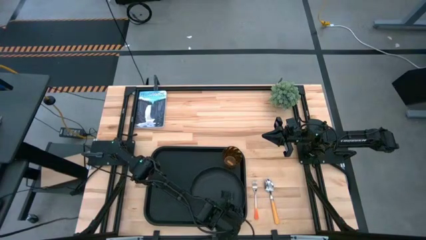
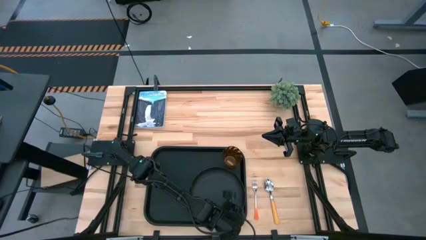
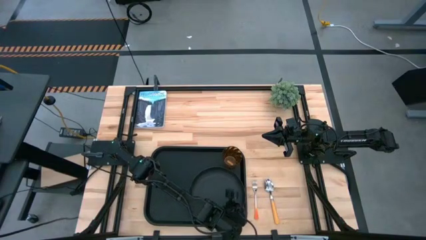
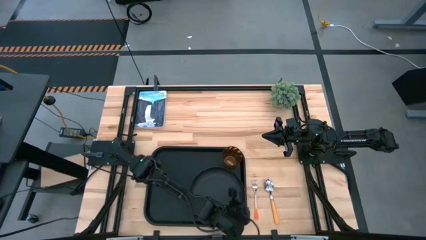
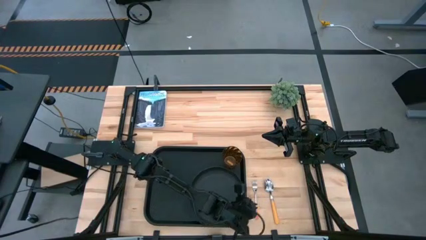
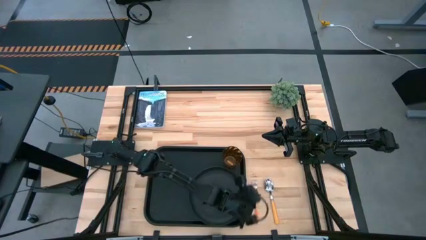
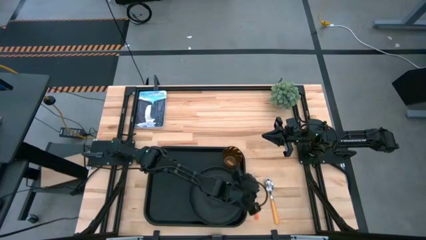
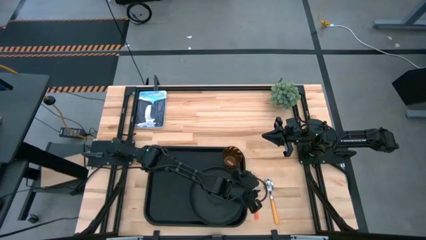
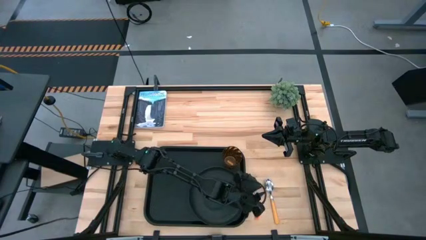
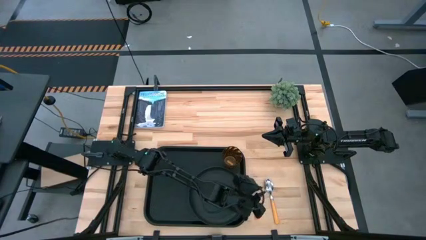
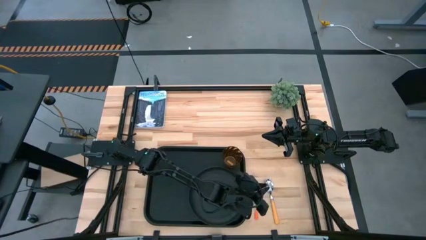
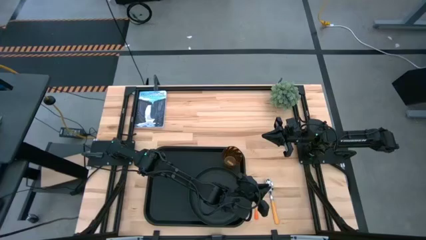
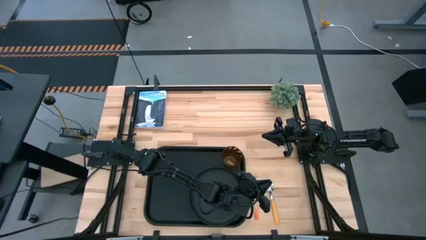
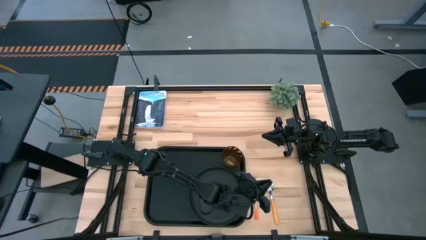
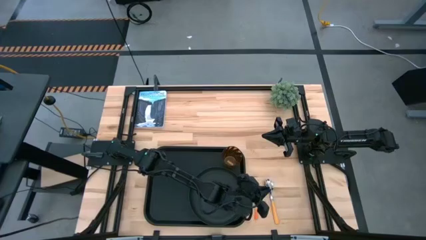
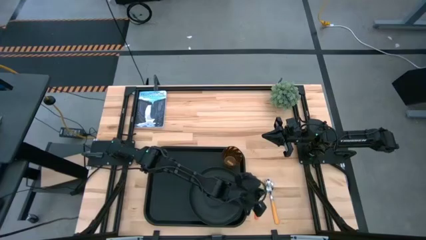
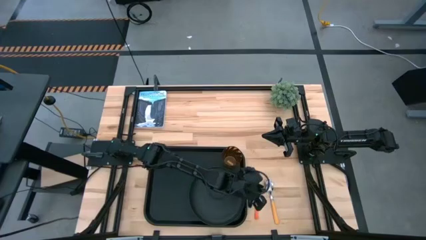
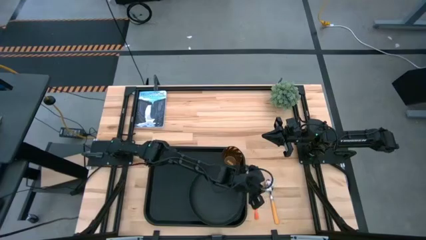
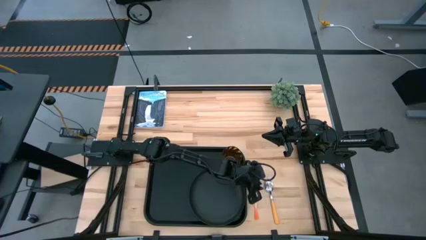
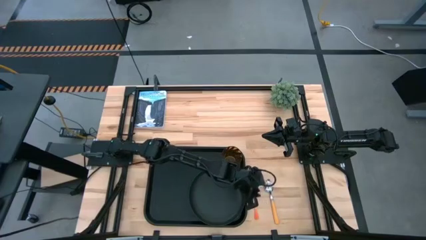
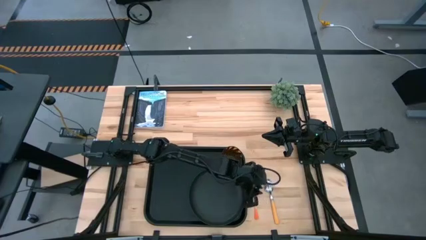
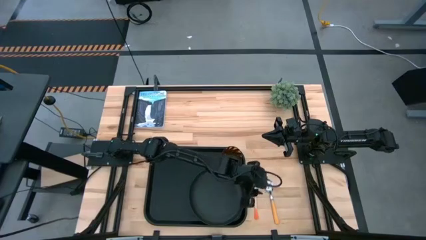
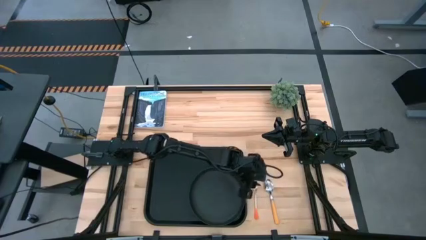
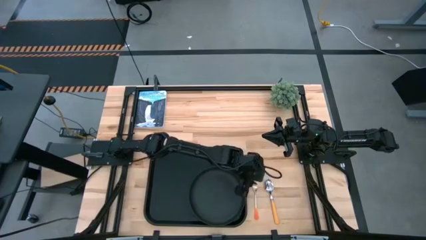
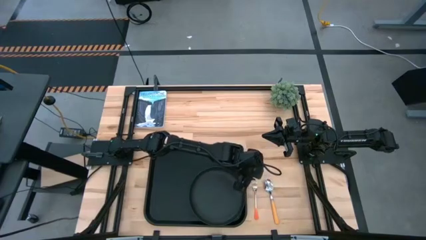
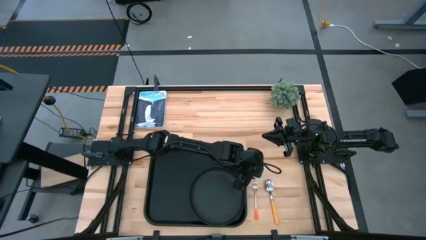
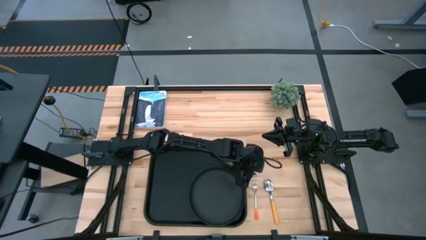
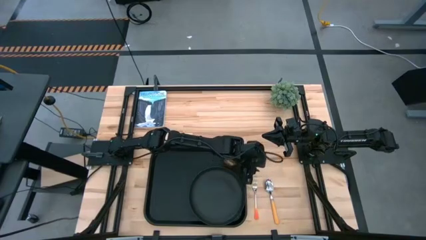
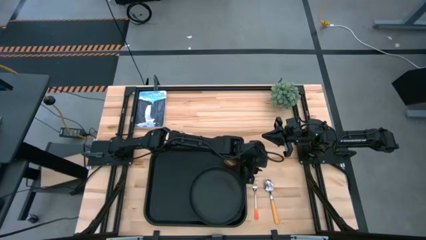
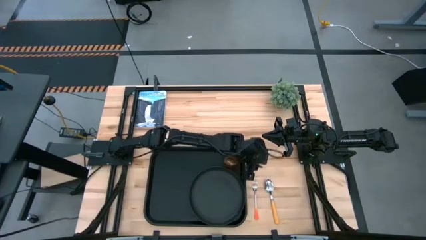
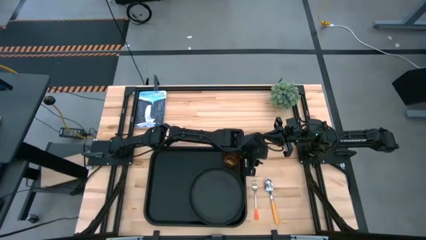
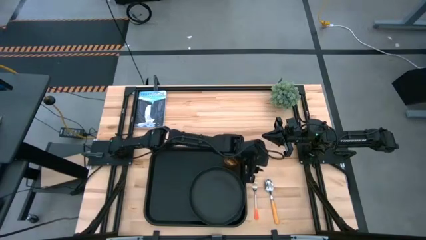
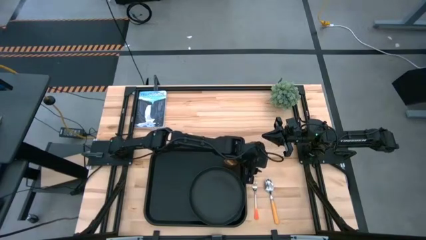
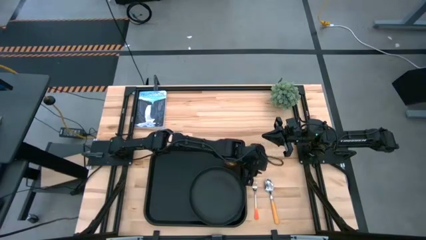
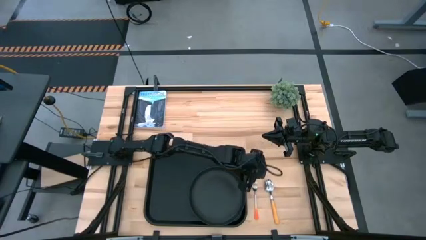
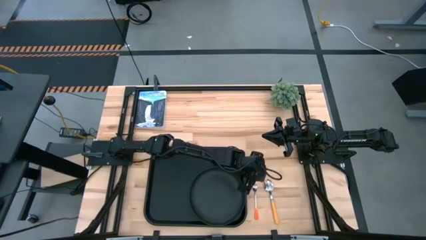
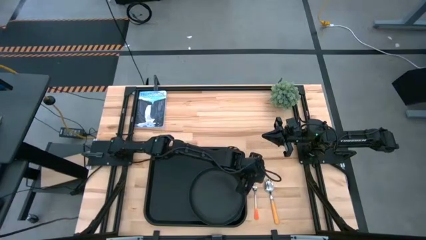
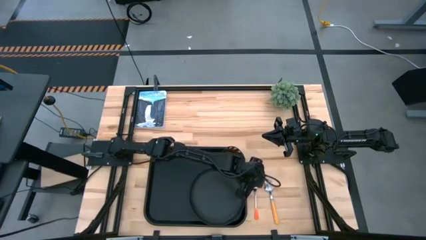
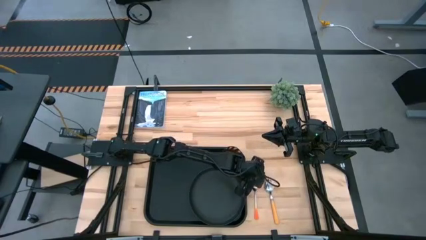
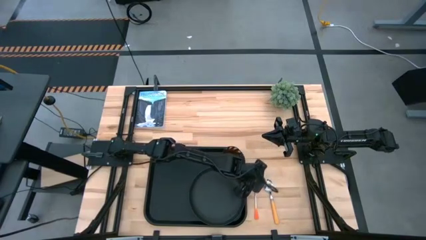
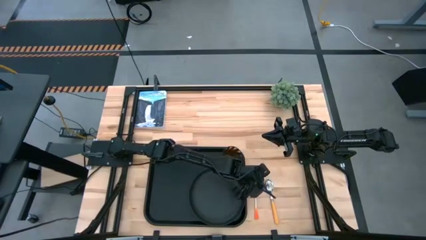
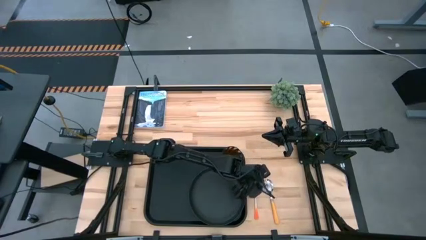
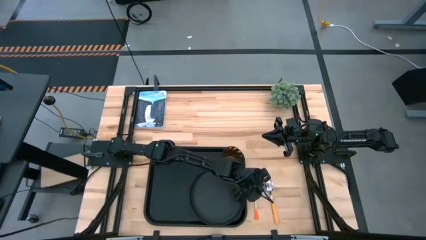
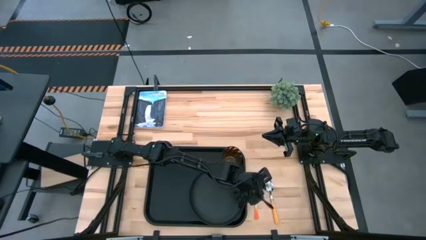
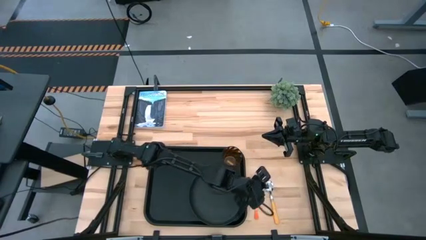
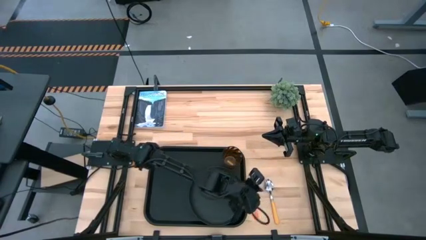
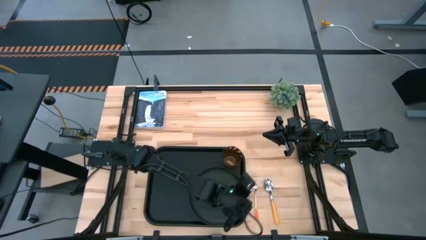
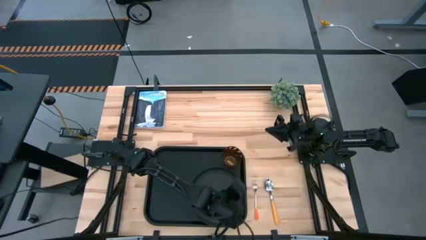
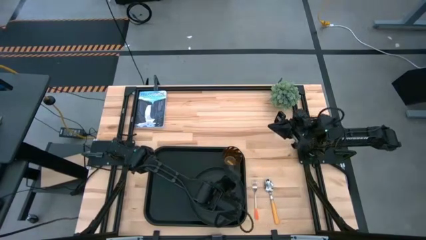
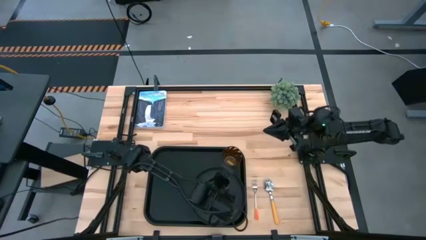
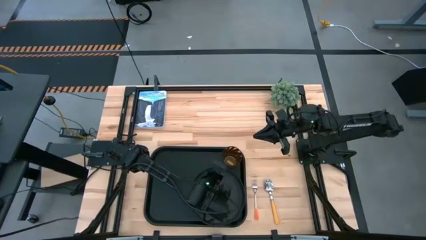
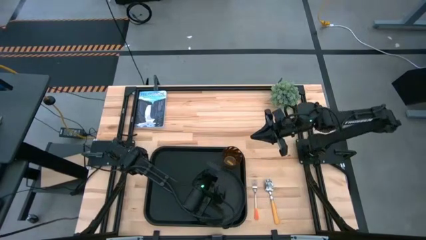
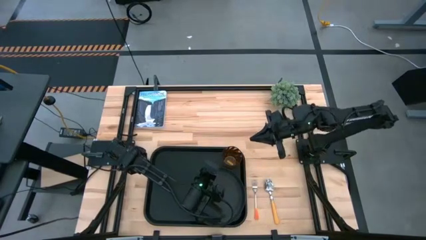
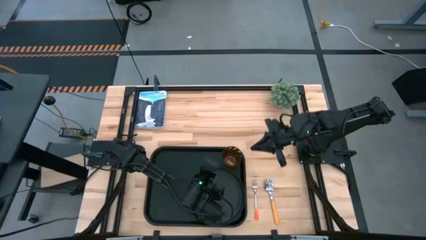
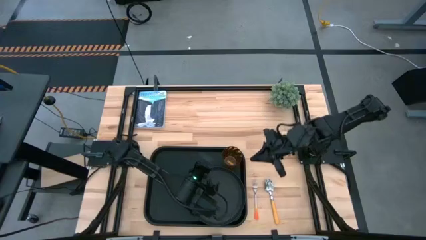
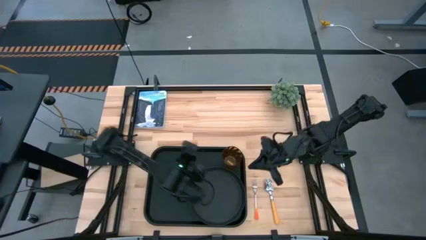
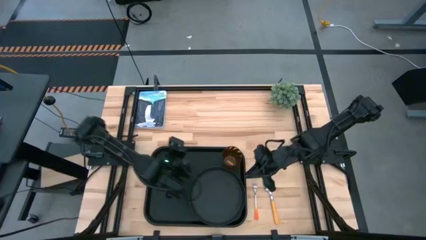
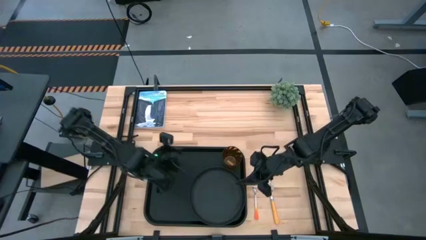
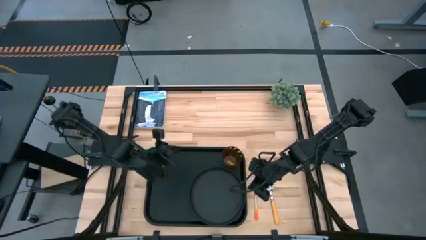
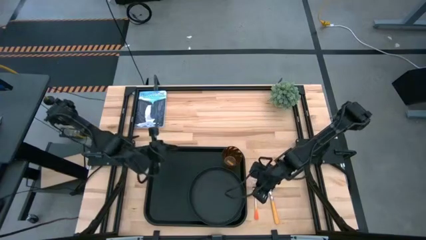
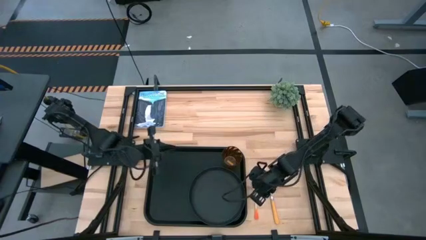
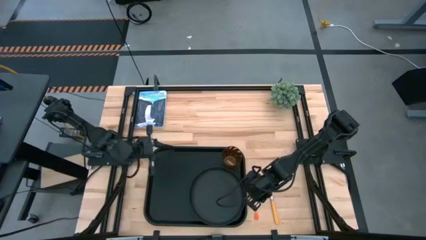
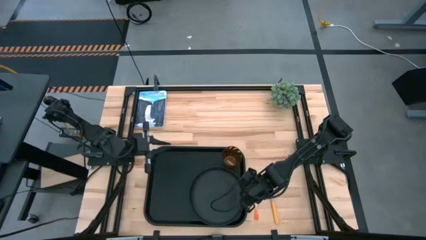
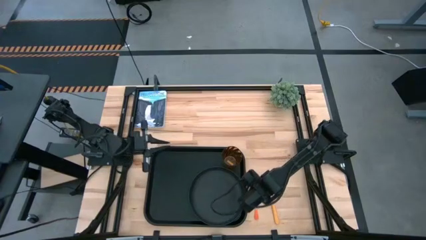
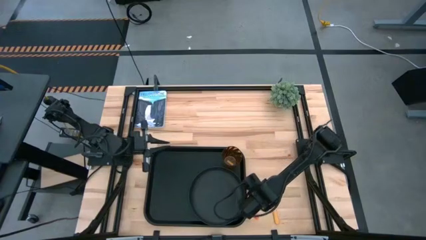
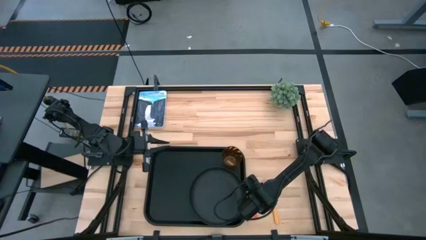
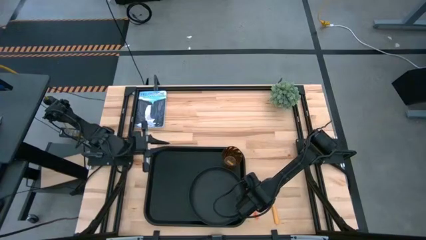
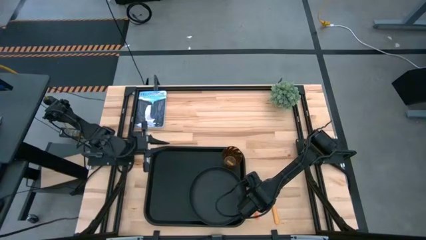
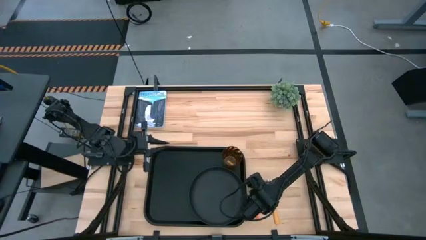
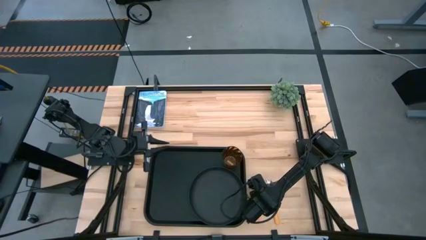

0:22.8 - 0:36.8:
Task: Pick and place plate/cup/fork/spoon on tray
Put the orange fork to the left of the black plate on the black tray

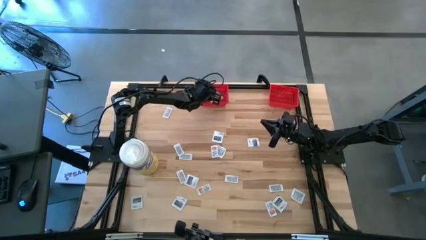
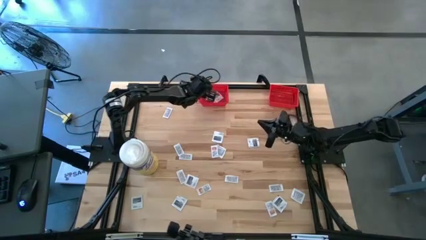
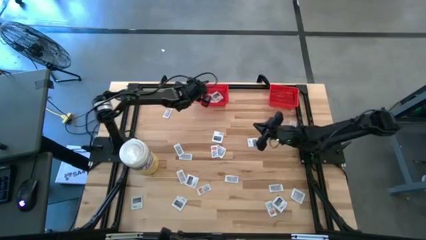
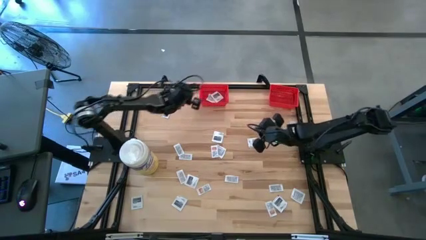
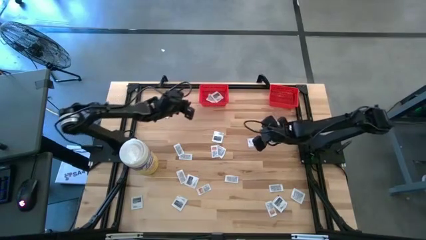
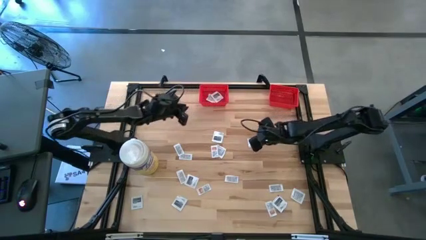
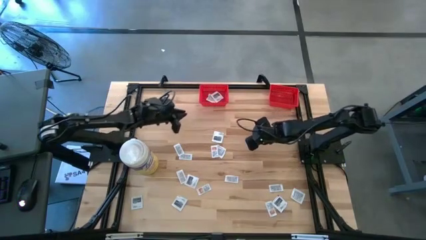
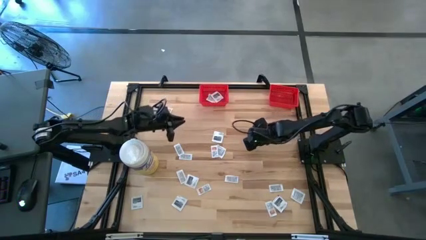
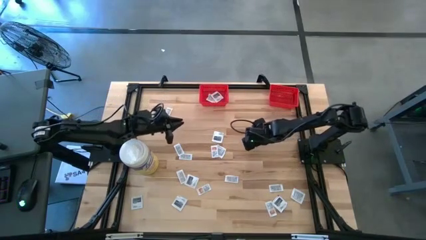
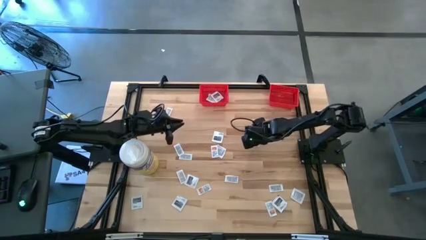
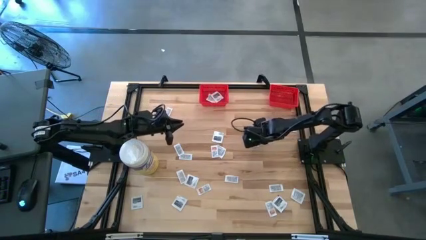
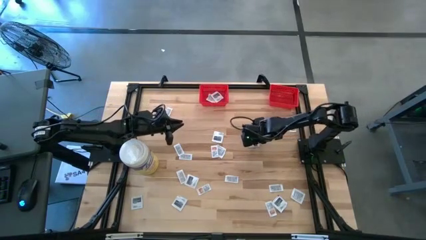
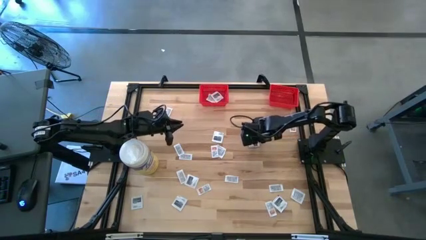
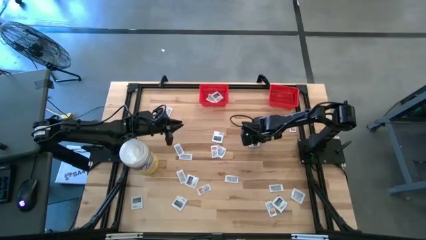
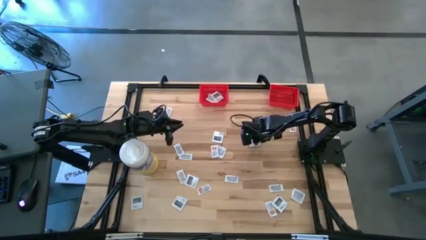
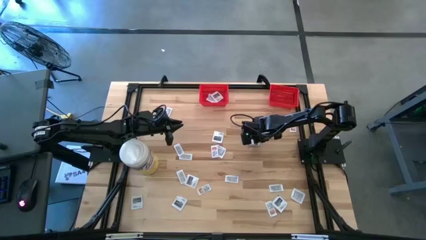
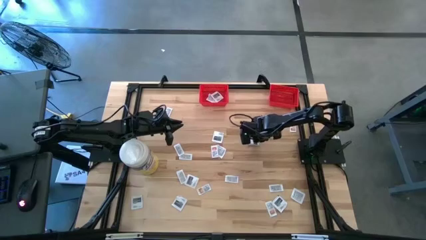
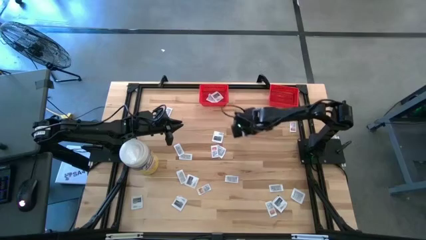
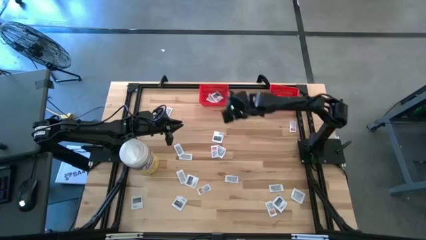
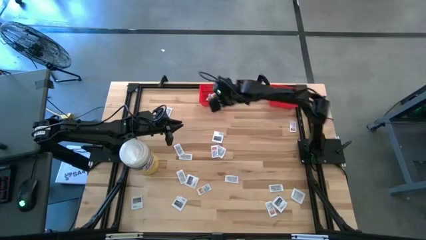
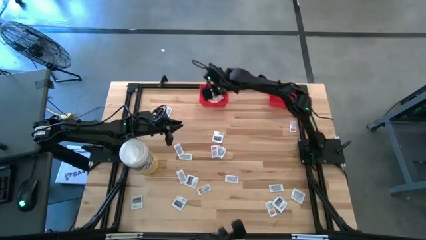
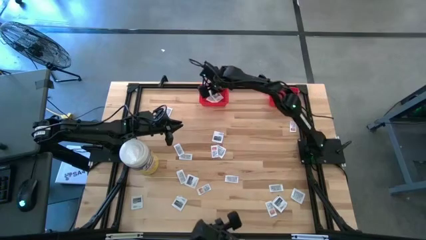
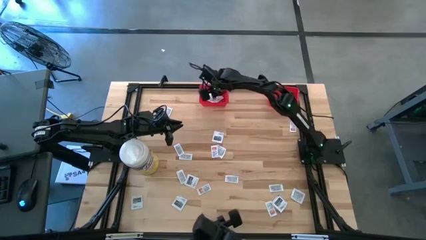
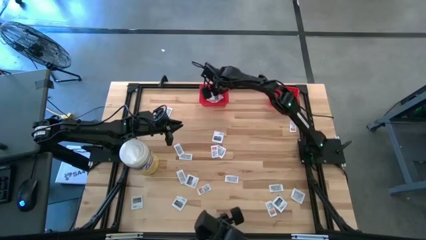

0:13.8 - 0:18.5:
Task: Pick & Place First Aid Supplies
Put the towelette pack into the left red bin
